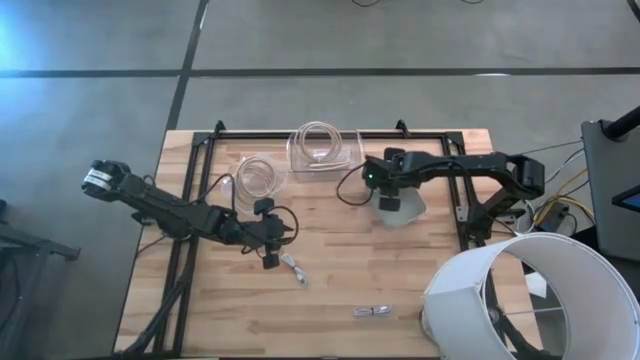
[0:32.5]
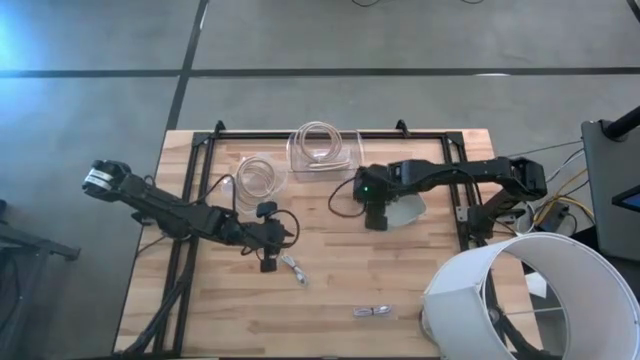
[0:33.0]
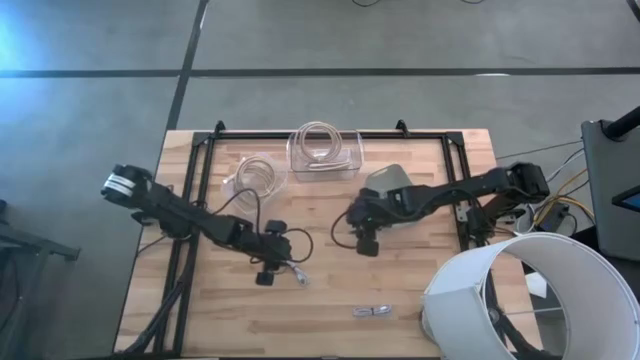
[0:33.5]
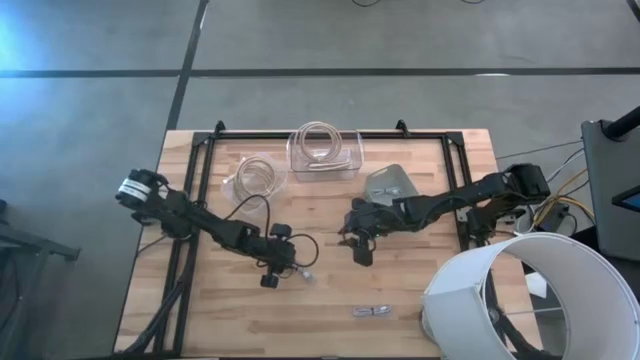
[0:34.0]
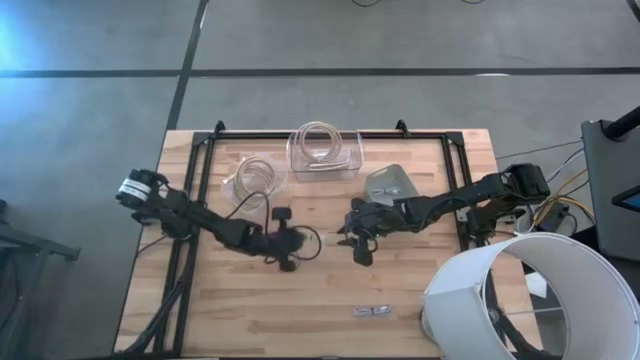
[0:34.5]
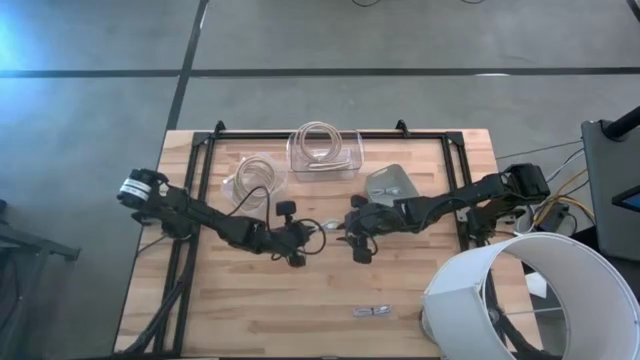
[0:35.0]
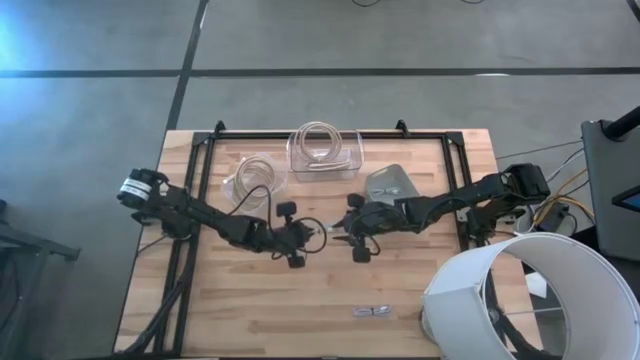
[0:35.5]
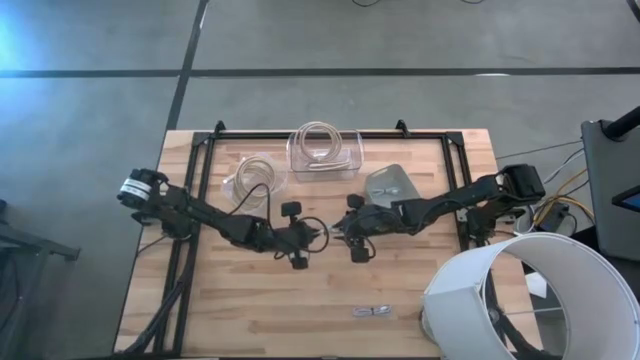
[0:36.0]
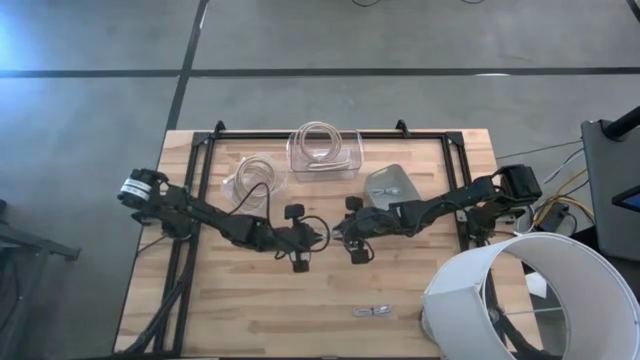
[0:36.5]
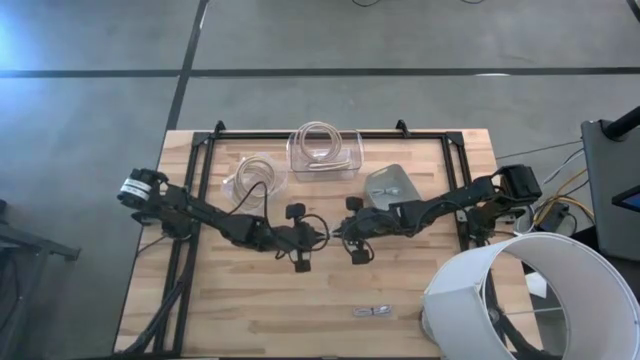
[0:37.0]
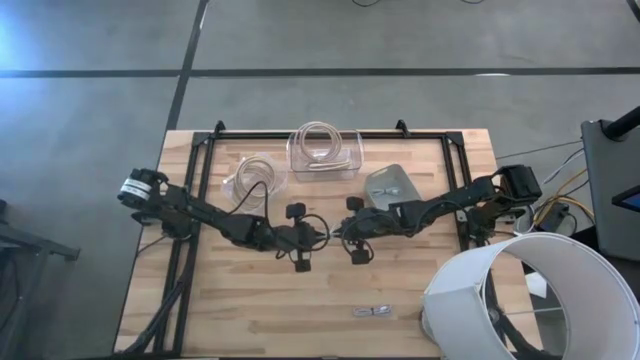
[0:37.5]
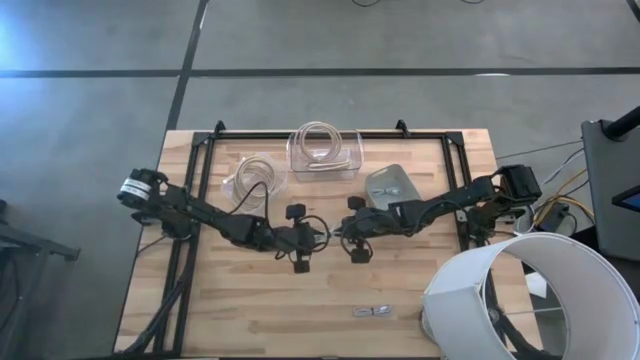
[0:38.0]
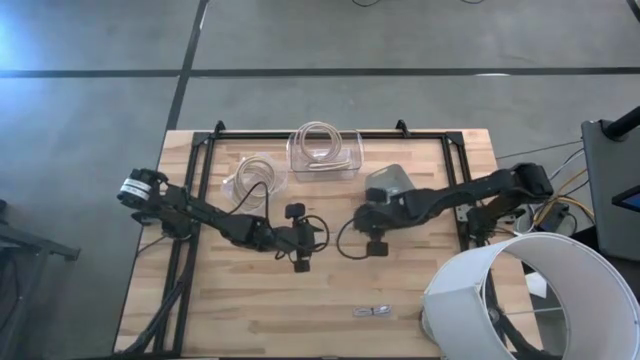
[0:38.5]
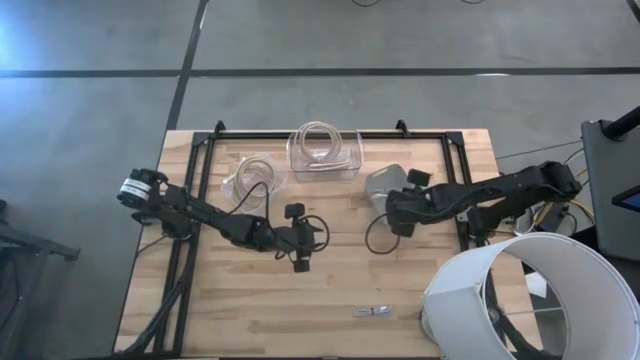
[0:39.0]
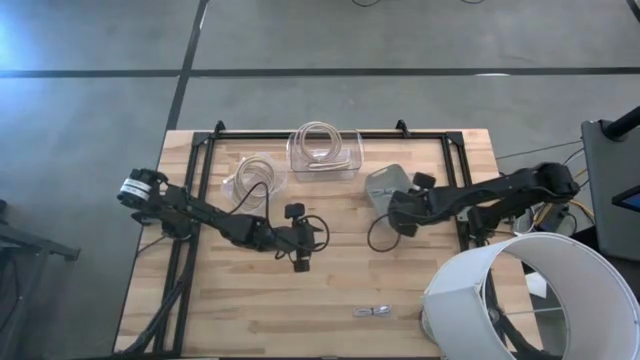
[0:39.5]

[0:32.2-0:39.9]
Task: Pick & Place USB Port
Put the white USB cable into the gray bin

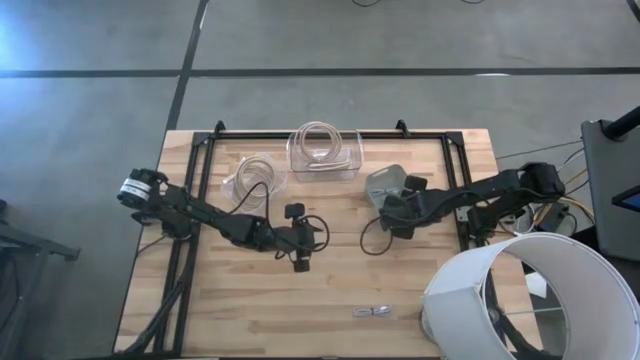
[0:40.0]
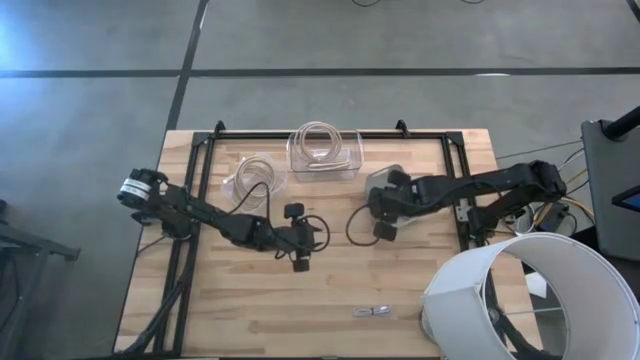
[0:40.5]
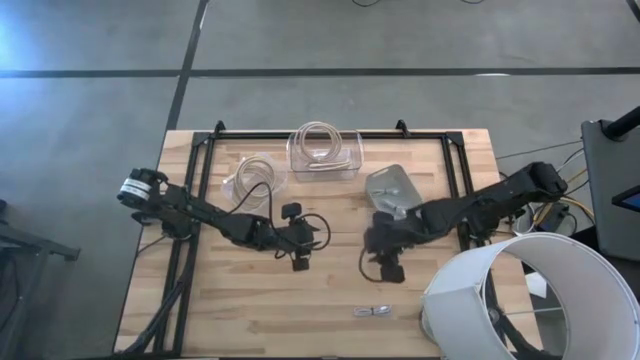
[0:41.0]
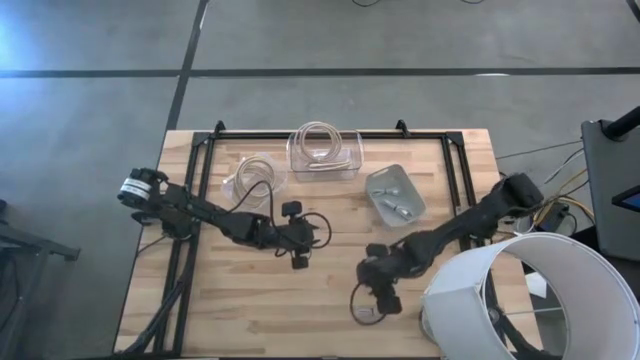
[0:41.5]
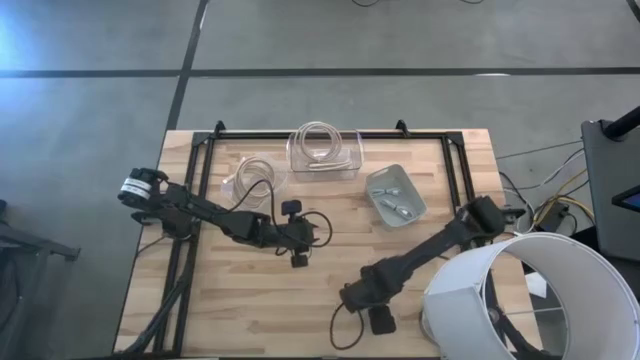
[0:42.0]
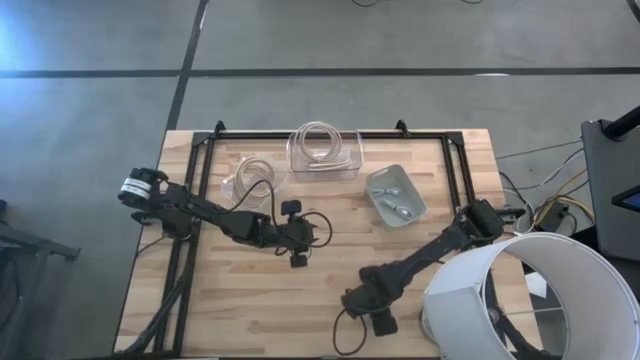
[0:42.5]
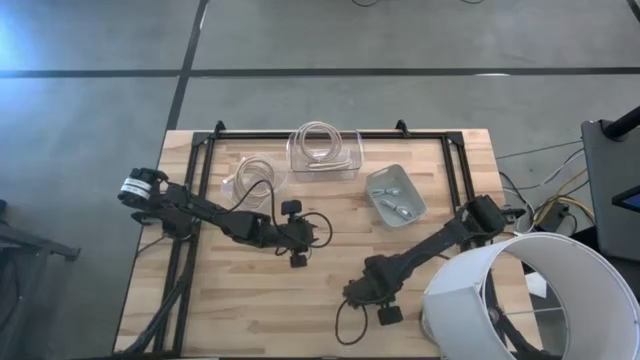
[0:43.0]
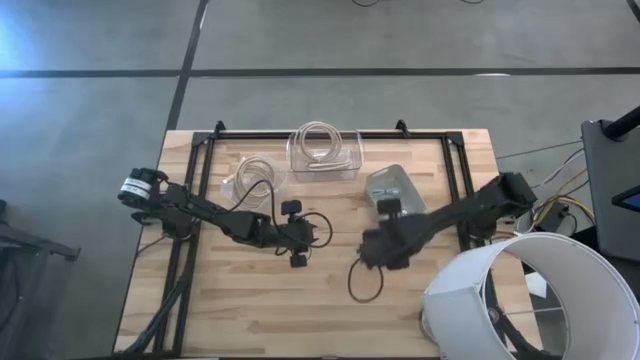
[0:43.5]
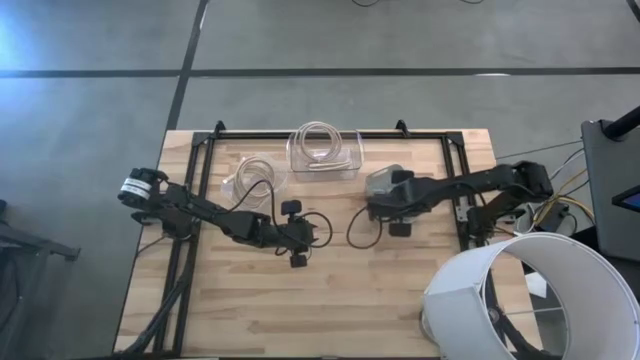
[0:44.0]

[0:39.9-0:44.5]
Put the purple USB cable into the gray bin

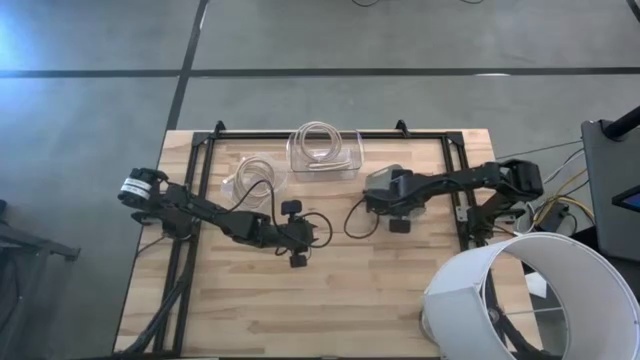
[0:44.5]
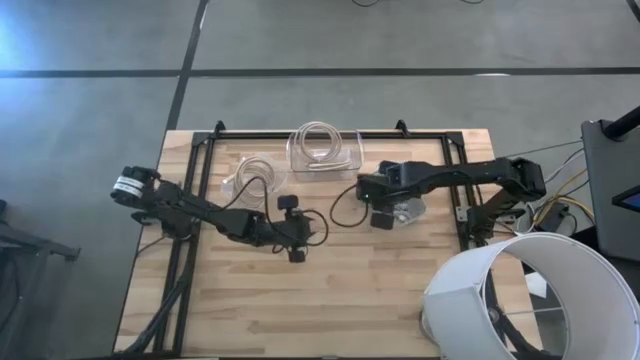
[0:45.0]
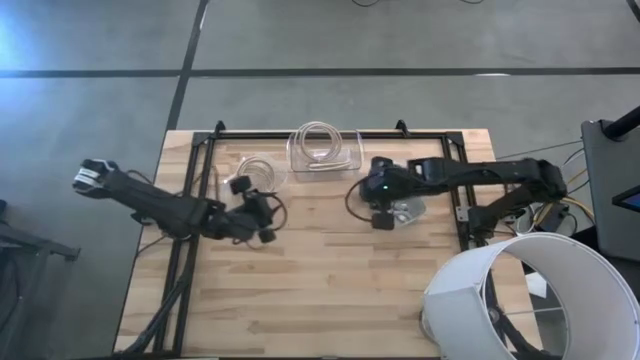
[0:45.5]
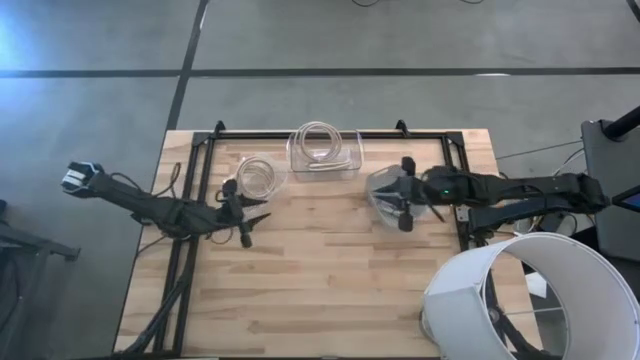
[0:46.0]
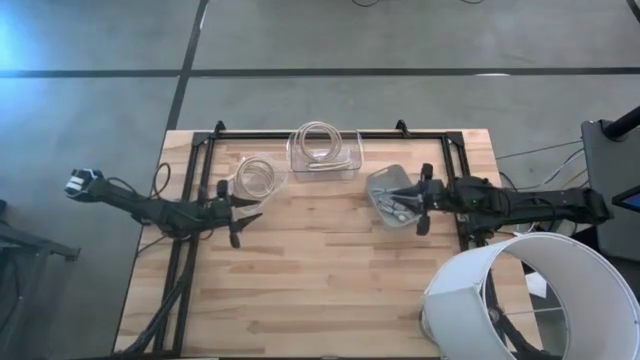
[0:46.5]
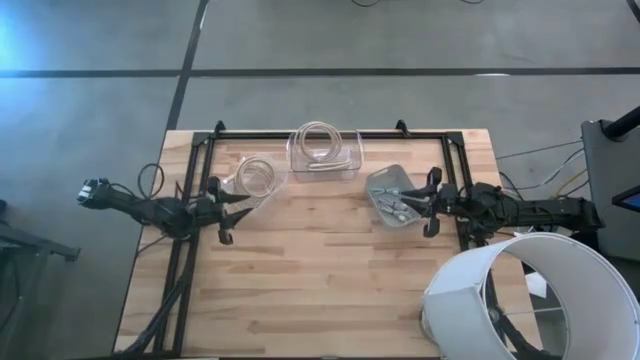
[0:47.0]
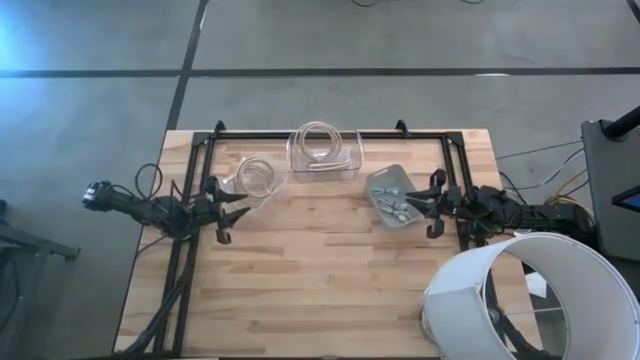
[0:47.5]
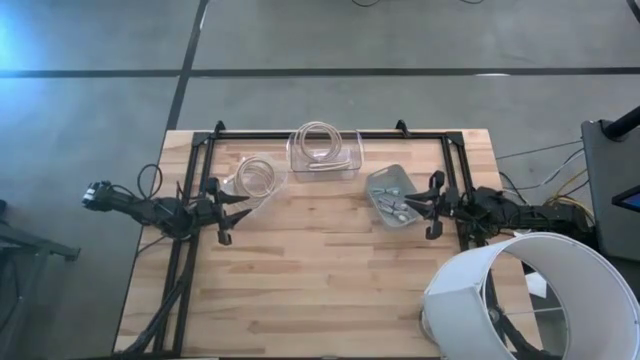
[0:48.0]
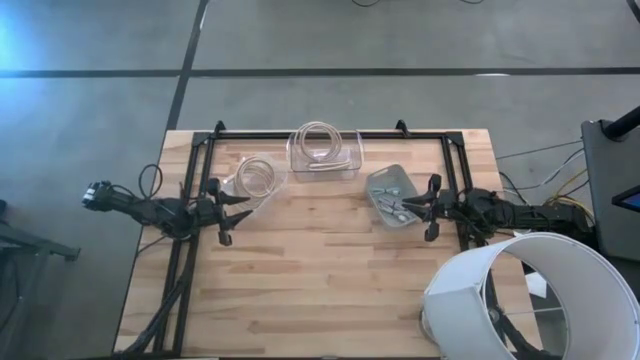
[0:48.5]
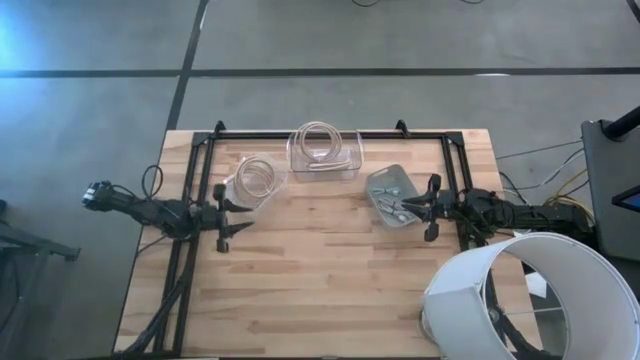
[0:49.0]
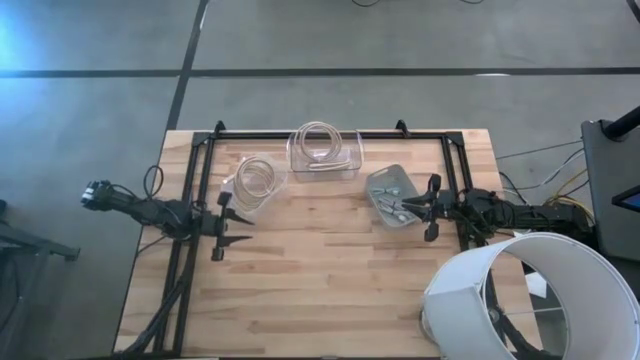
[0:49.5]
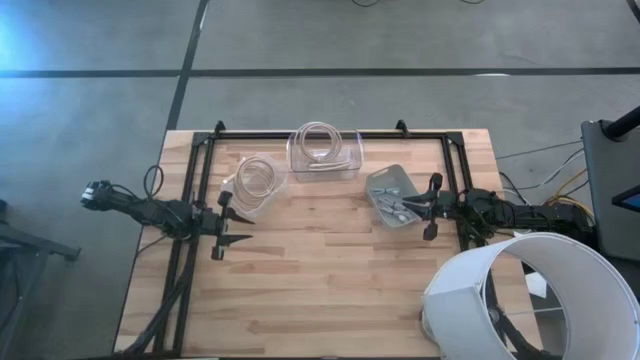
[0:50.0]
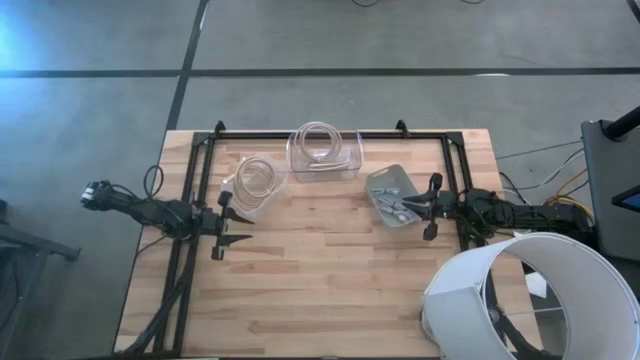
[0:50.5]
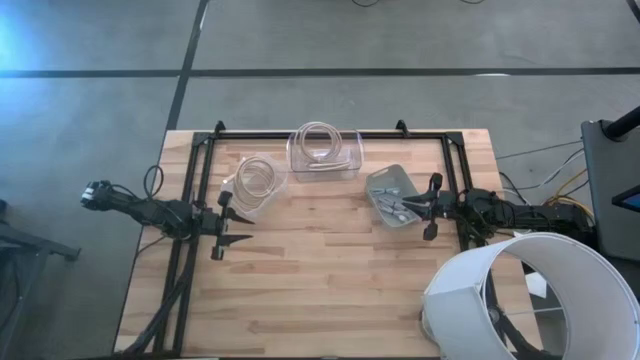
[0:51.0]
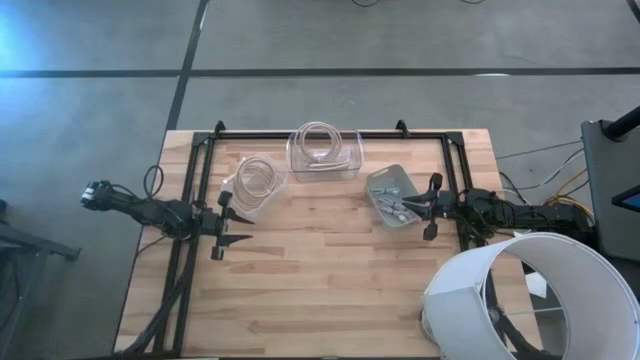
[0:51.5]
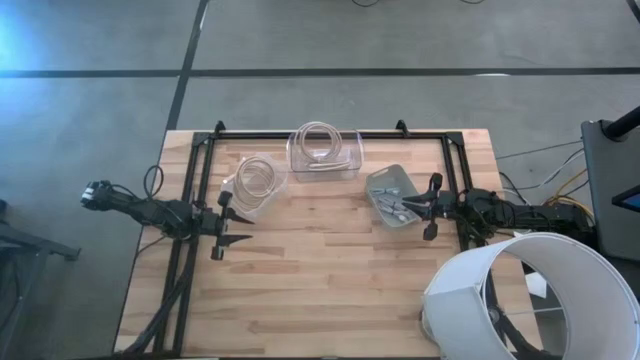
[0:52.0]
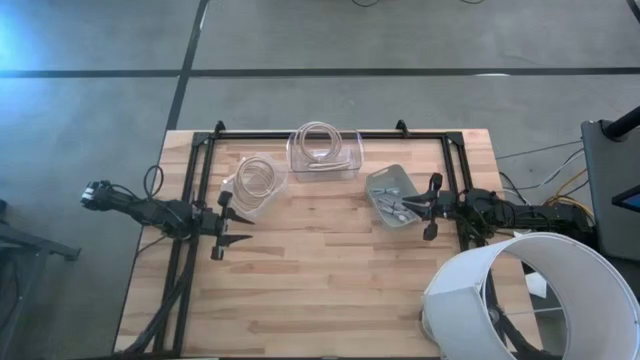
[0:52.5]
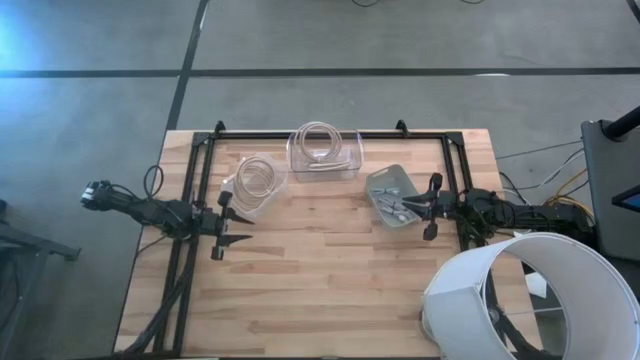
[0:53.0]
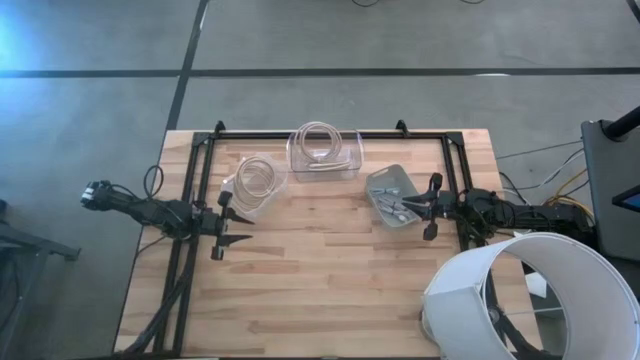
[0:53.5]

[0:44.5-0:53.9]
Return to Home Position
